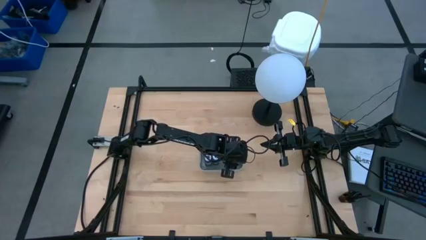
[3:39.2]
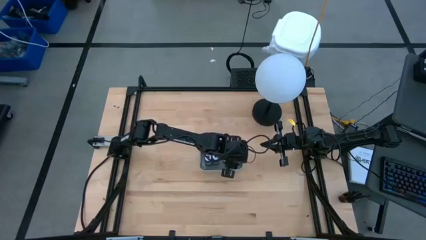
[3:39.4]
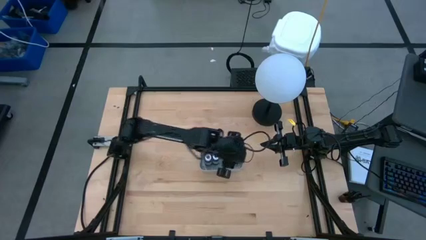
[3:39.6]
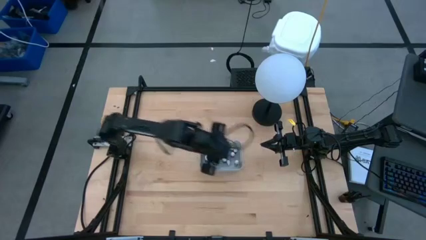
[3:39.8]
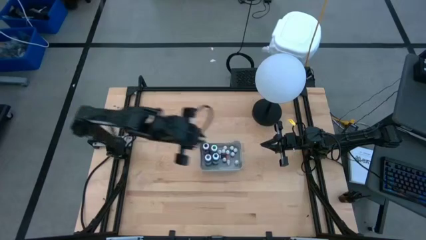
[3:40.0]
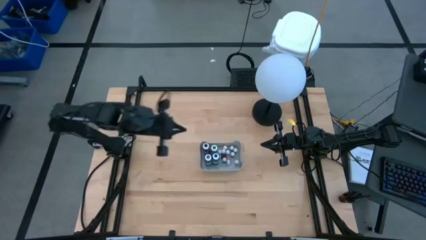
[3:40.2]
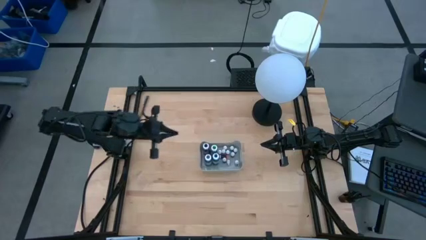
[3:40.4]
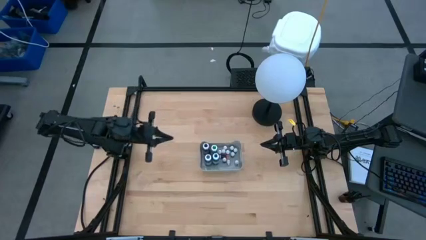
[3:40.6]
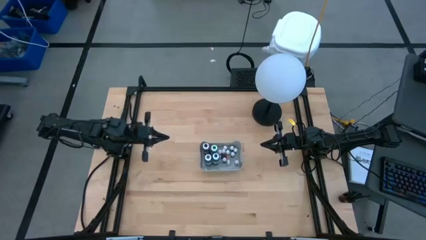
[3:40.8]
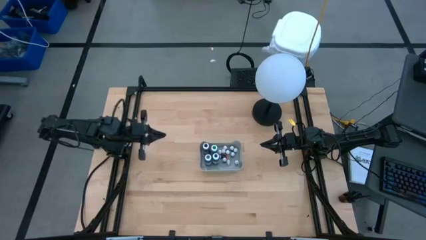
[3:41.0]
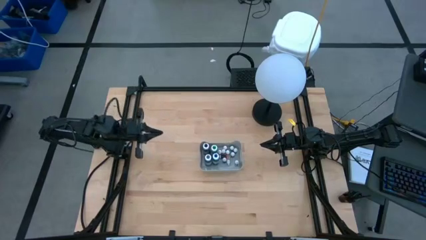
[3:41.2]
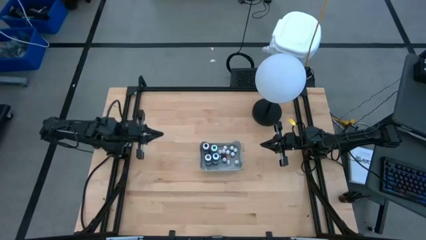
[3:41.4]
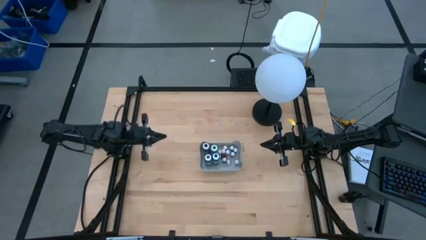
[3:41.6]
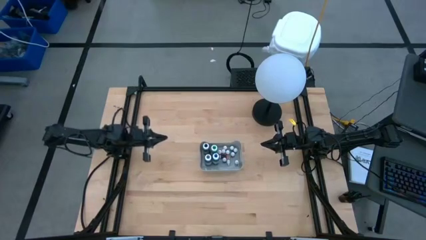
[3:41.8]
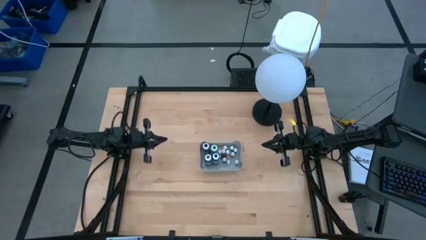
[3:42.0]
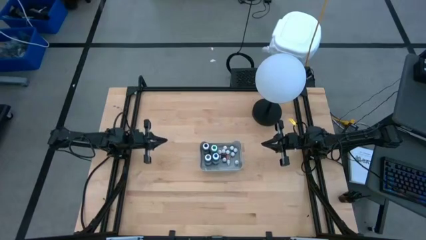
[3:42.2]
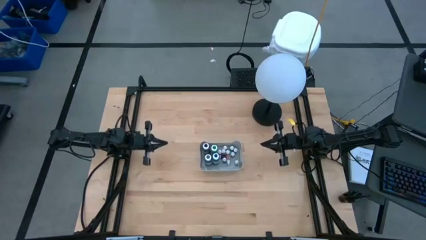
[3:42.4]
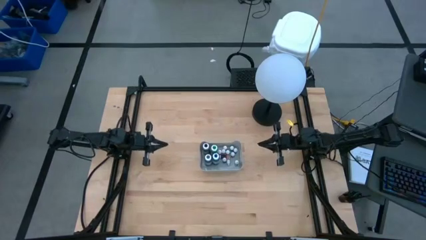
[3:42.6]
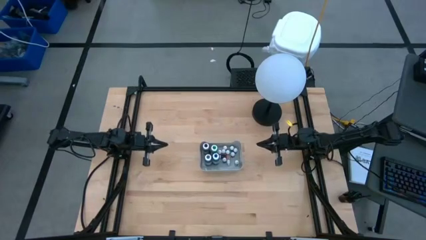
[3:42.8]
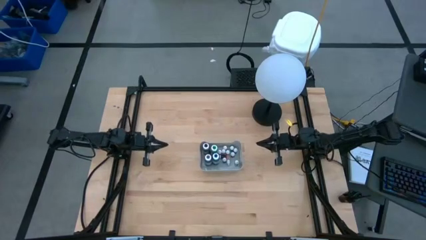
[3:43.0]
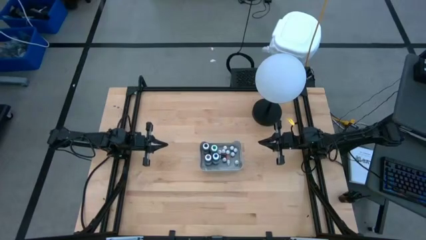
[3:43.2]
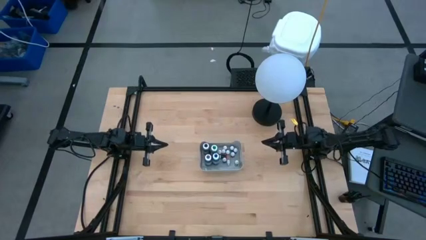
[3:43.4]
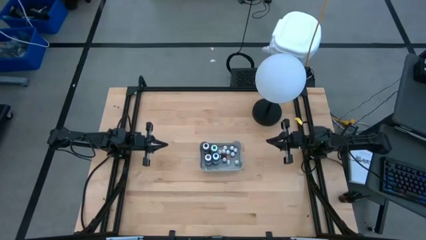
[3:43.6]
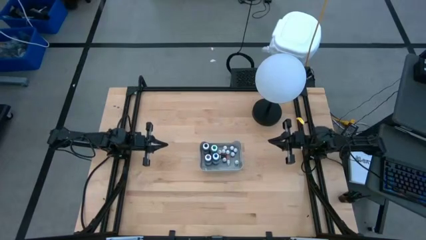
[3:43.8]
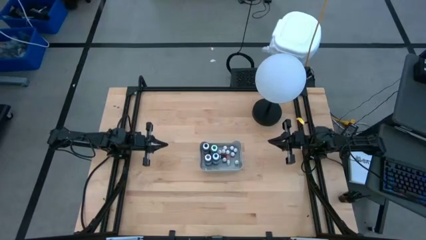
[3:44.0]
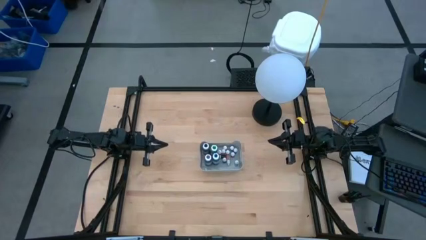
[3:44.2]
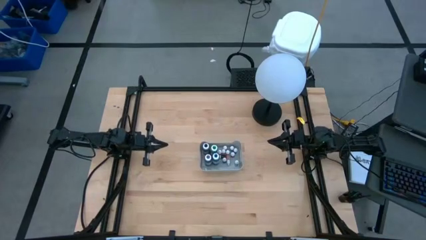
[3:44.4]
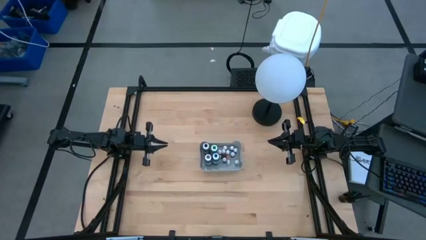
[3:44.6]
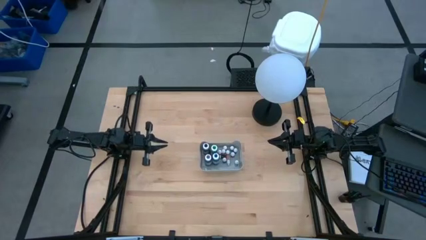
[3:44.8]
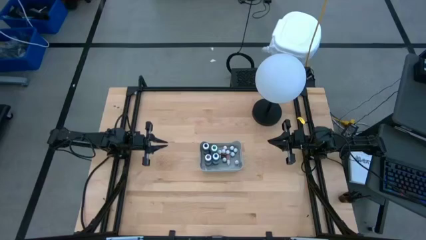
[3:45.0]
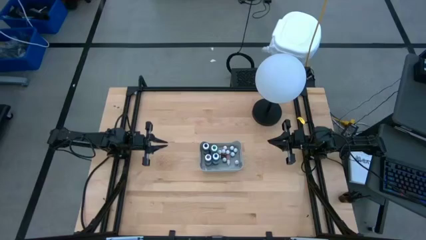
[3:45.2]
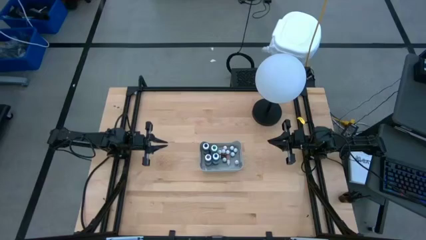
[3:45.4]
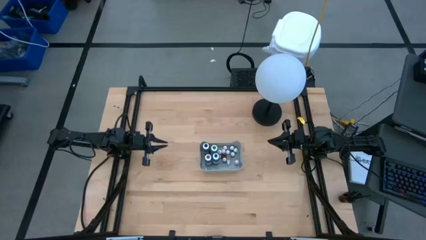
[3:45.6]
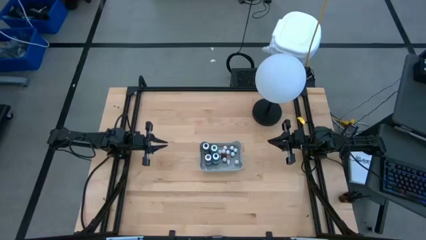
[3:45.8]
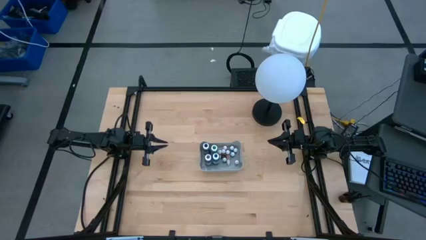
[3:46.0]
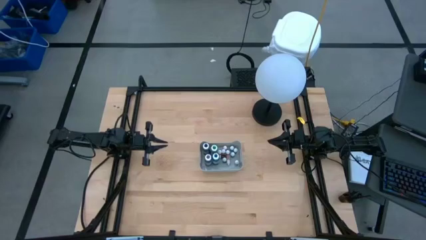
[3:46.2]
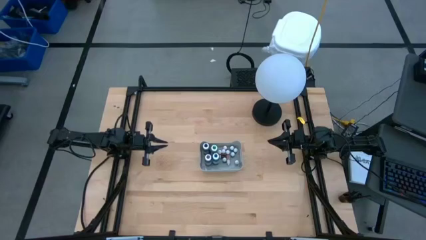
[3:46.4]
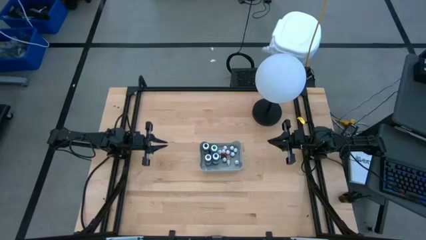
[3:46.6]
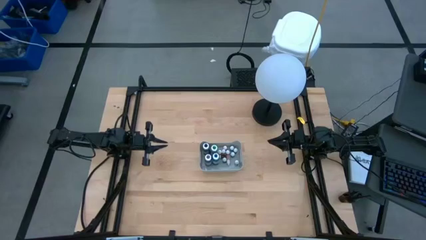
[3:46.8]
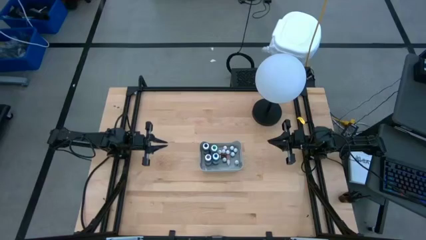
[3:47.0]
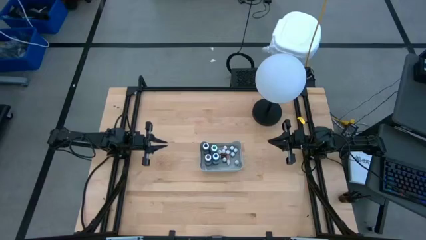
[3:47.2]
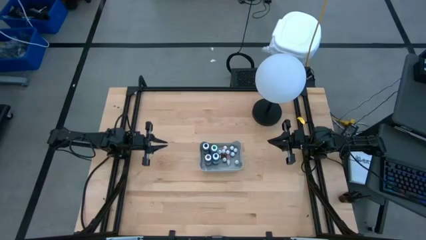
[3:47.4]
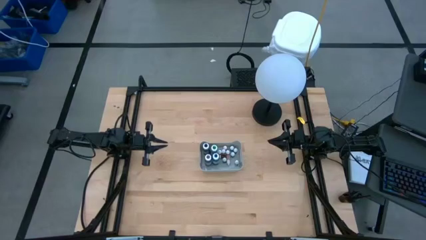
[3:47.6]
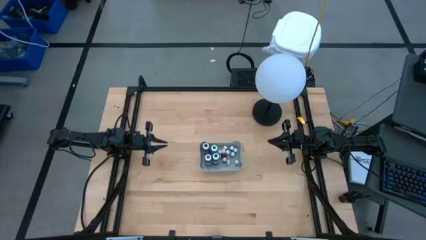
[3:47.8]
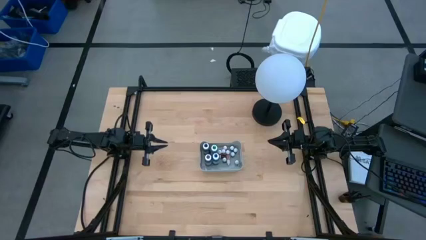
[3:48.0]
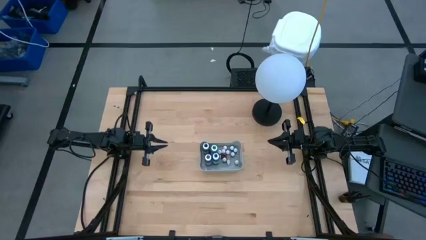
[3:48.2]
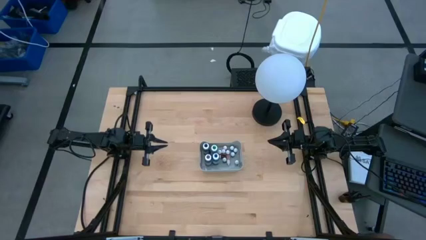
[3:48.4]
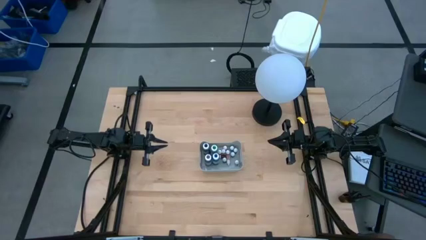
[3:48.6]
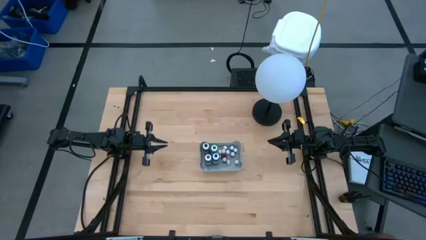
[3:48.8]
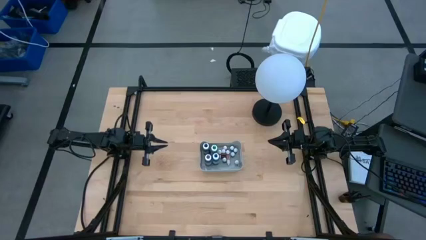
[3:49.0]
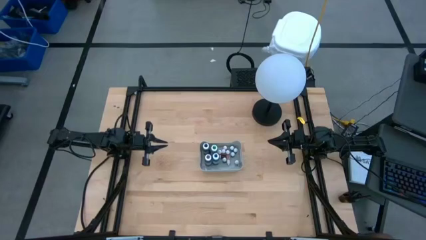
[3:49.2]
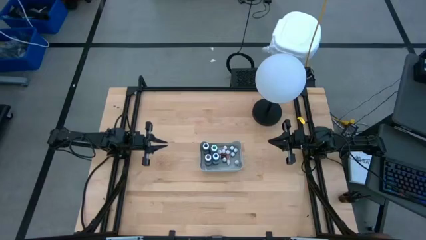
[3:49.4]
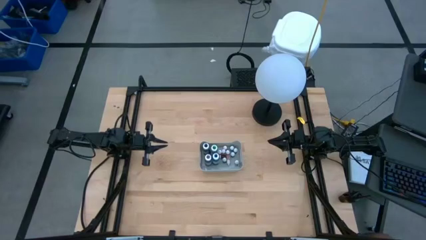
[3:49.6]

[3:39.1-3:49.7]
Task: Pick & Place food coloring
Return to Home Position

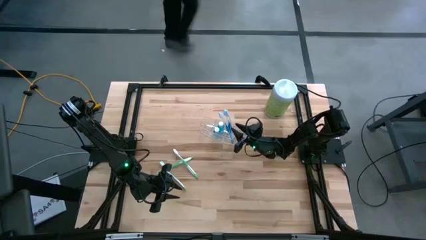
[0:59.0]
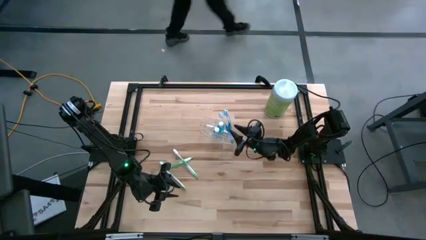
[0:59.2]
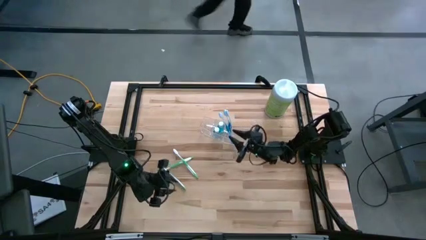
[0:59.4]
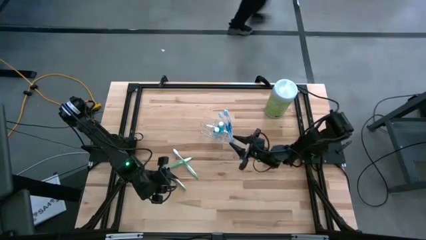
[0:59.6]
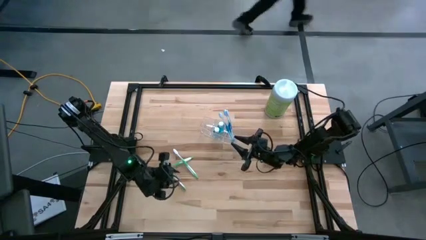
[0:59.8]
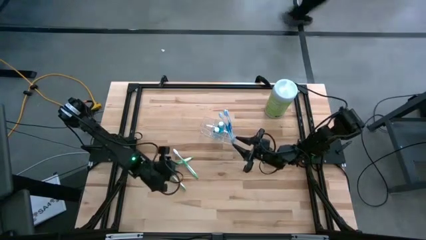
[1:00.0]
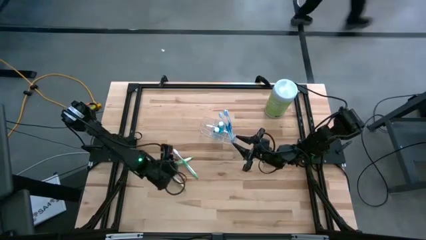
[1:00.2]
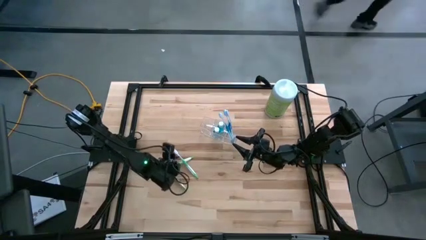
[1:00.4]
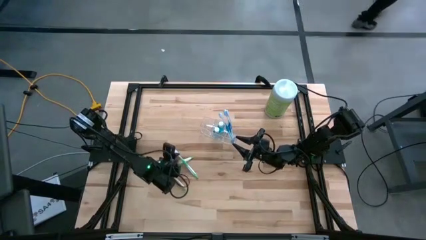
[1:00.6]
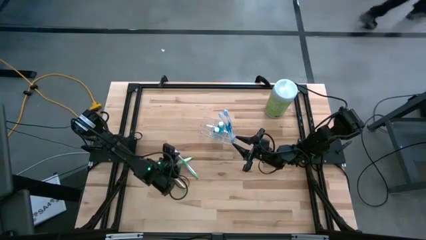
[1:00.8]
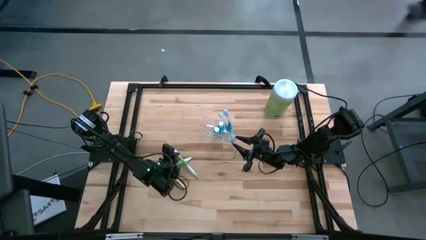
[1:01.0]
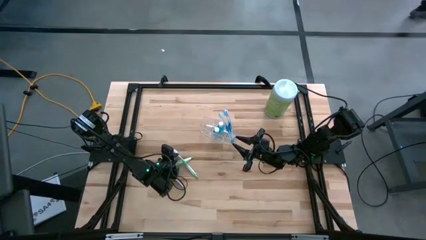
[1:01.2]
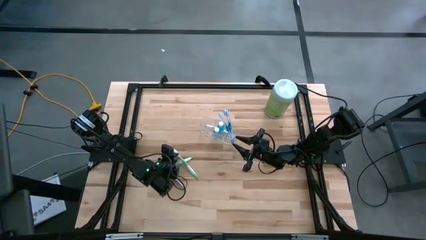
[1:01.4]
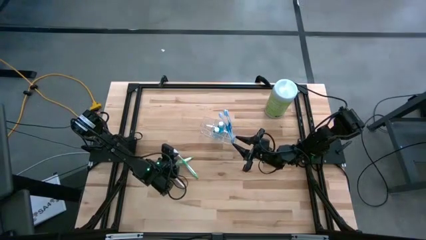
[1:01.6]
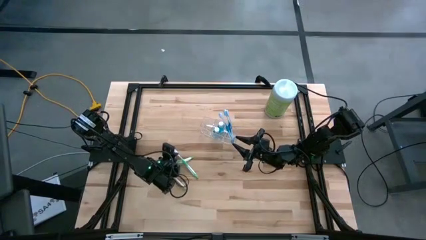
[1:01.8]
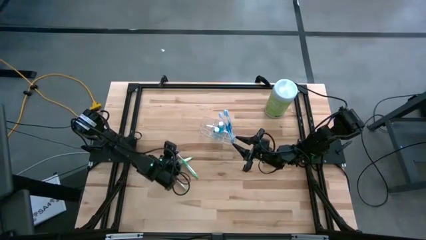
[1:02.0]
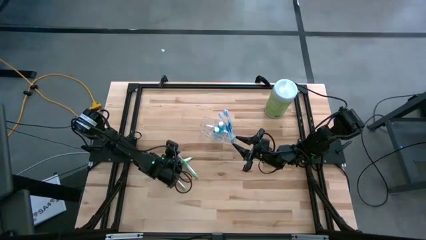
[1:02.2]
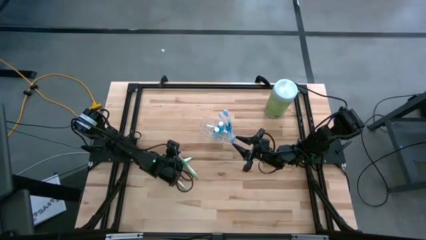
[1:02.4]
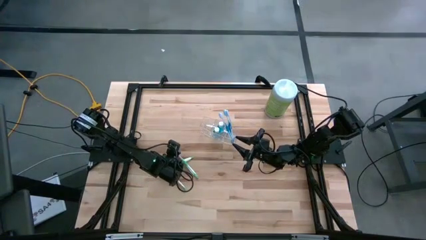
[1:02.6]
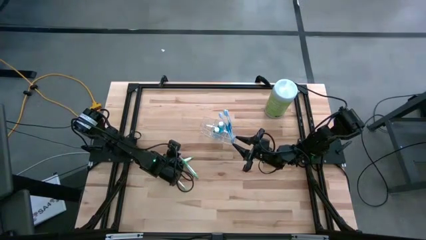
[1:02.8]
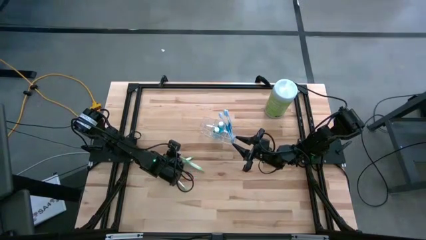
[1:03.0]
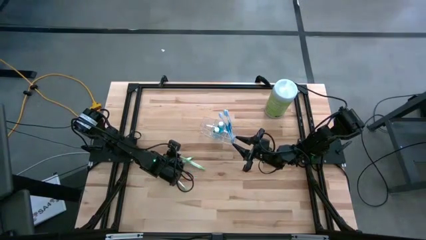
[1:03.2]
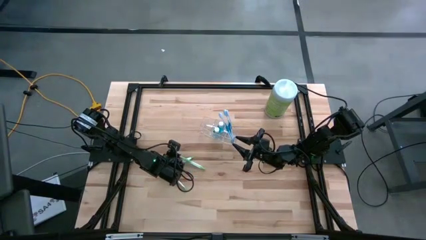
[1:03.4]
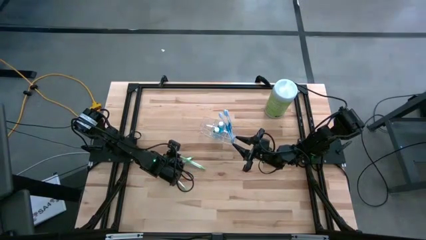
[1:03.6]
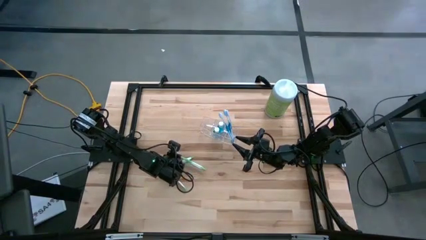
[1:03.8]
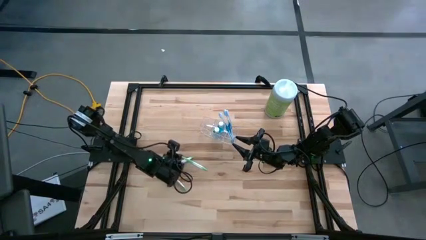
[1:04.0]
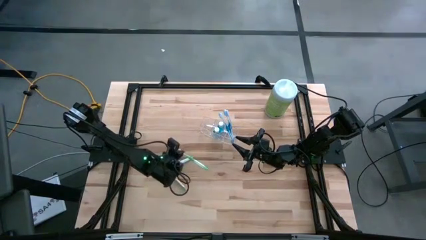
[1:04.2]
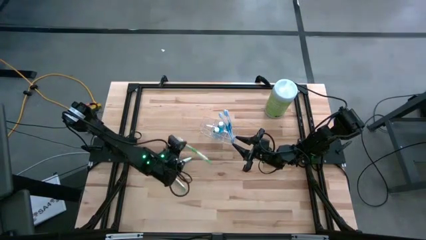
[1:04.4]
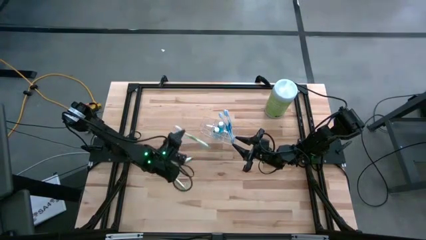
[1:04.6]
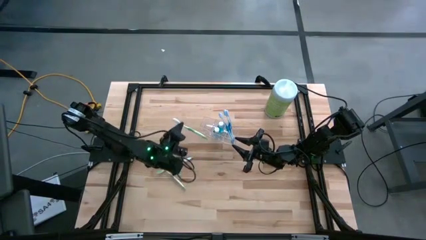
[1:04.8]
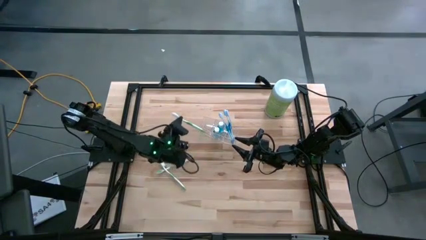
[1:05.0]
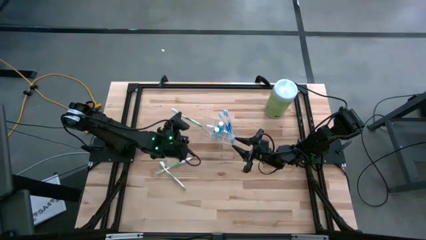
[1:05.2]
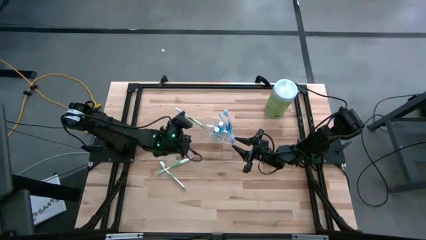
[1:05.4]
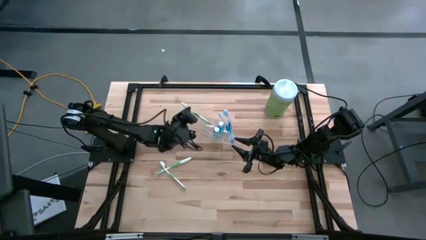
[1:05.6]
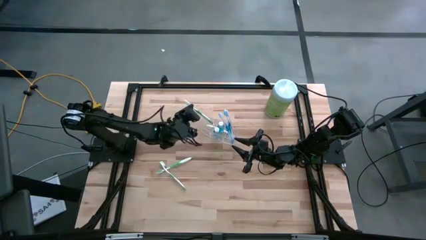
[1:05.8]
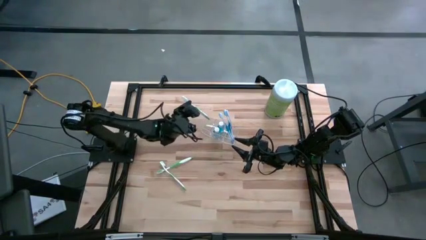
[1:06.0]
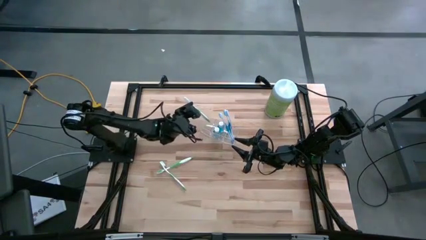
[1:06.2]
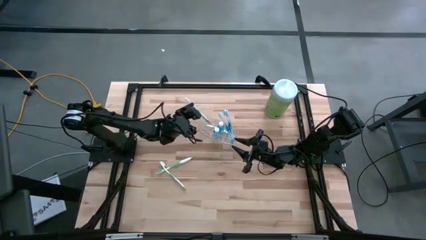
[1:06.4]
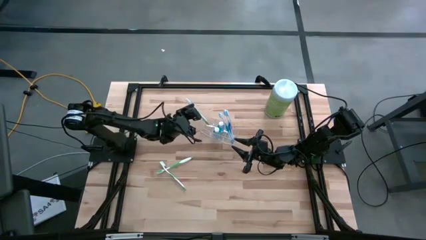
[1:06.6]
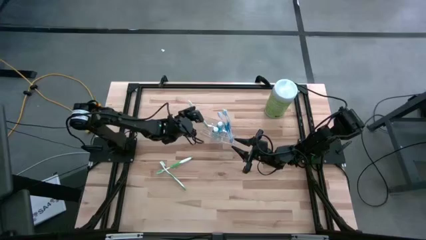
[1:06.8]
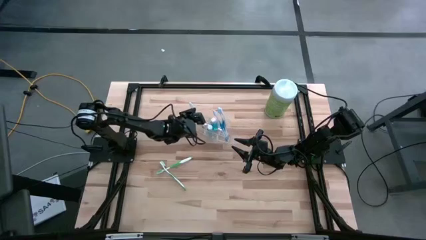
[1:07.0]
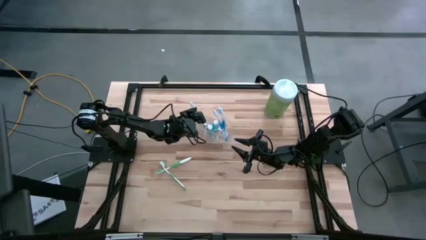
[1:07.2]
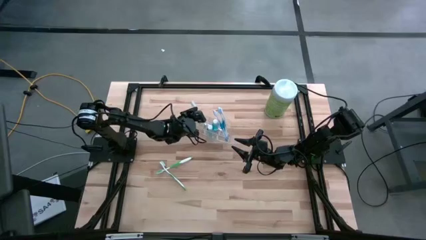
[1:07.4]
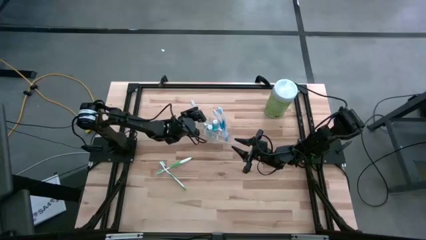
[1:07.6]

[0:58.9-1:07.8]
Task: Pick & Place toothbrushing station
Put the top green toothbrush into the transparent organizer
